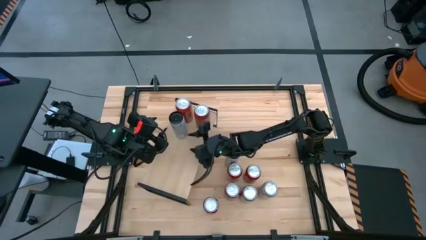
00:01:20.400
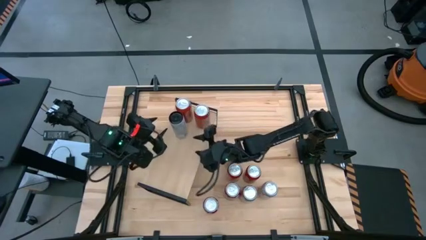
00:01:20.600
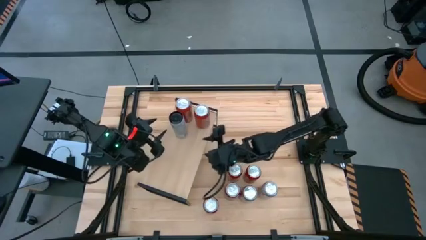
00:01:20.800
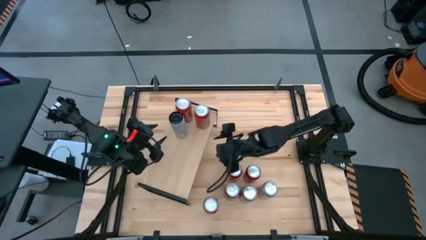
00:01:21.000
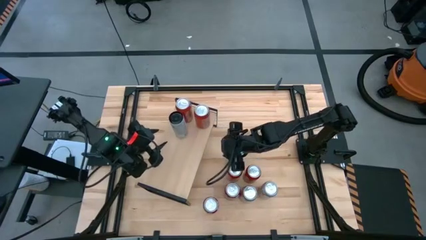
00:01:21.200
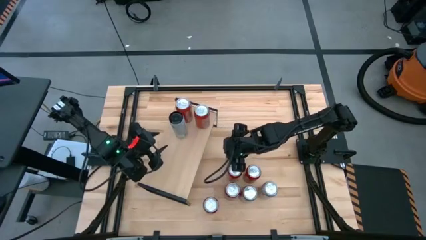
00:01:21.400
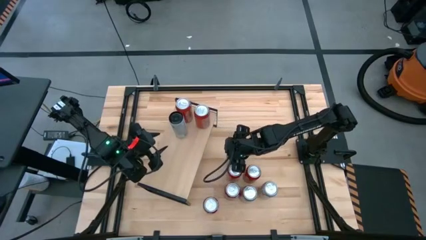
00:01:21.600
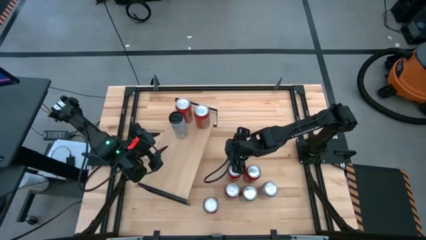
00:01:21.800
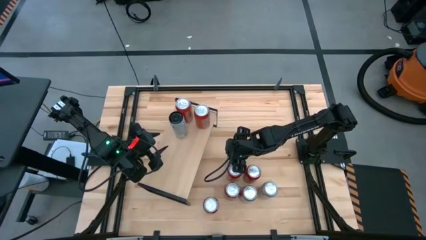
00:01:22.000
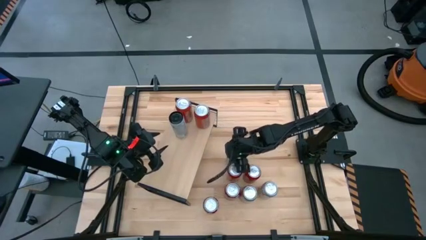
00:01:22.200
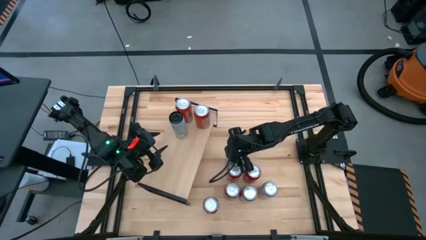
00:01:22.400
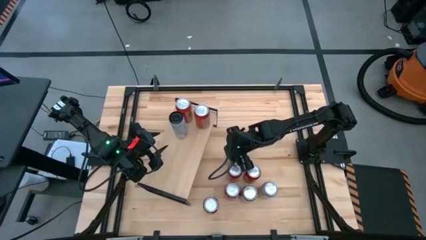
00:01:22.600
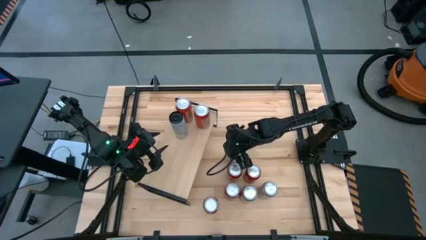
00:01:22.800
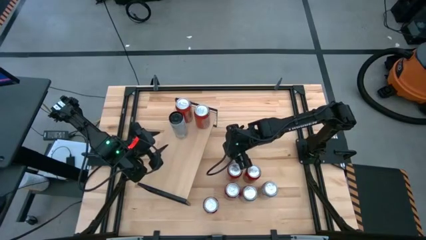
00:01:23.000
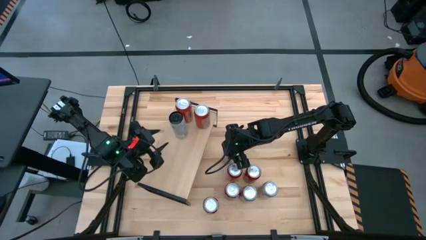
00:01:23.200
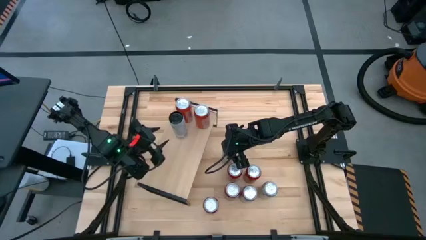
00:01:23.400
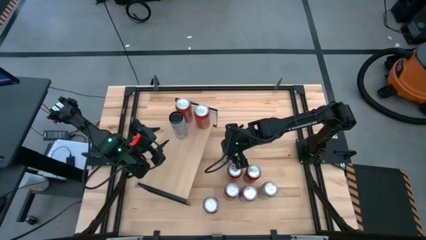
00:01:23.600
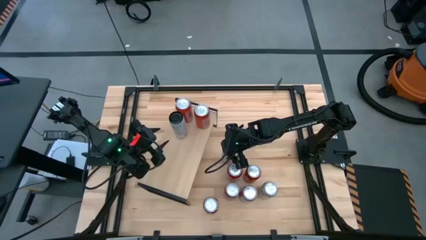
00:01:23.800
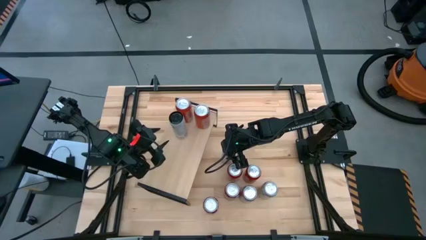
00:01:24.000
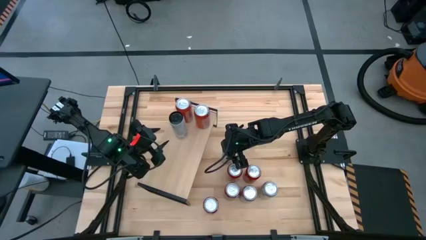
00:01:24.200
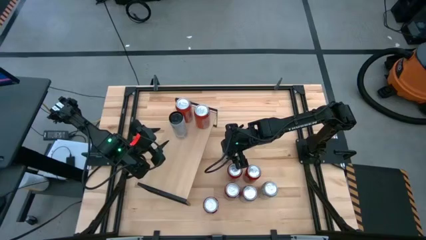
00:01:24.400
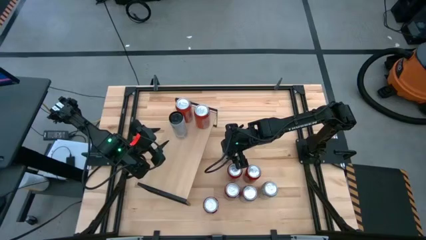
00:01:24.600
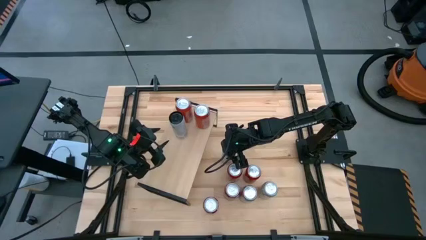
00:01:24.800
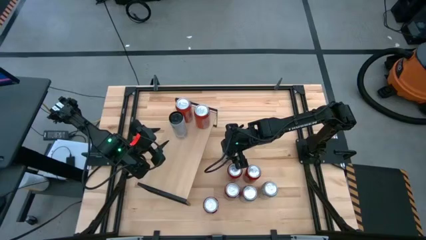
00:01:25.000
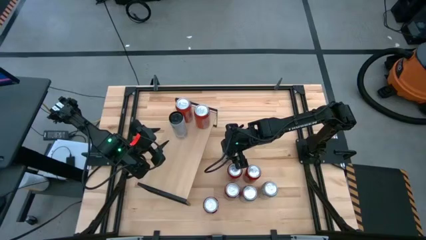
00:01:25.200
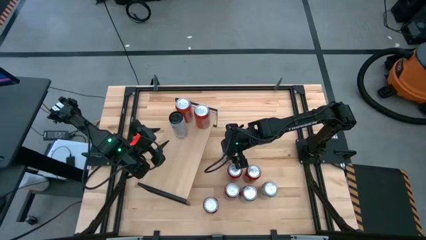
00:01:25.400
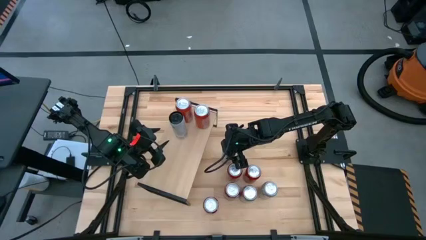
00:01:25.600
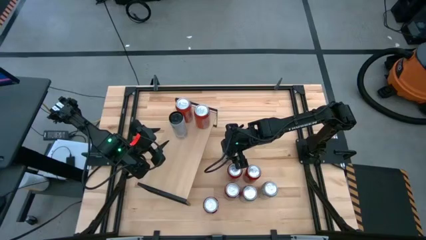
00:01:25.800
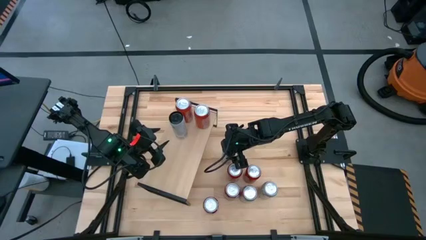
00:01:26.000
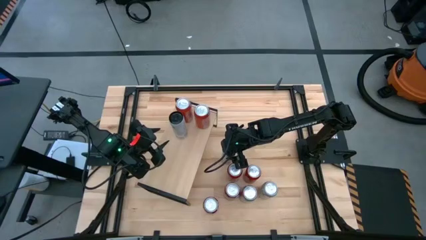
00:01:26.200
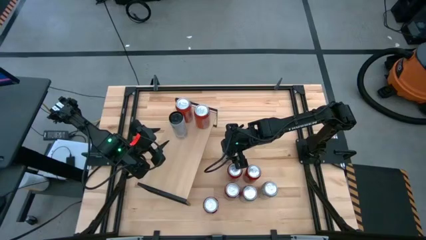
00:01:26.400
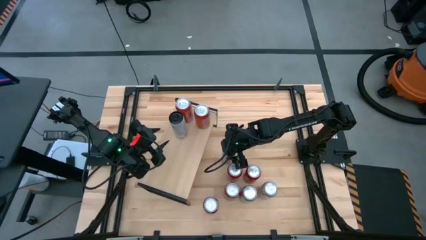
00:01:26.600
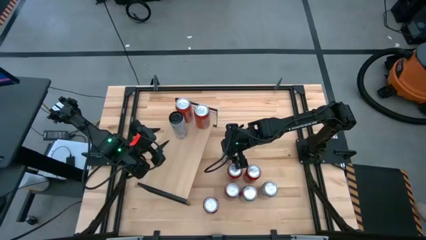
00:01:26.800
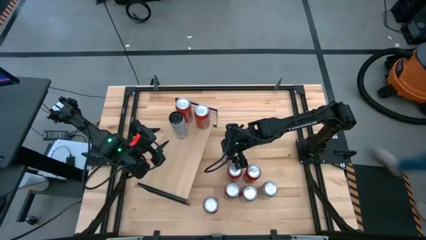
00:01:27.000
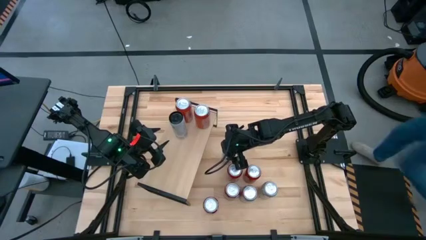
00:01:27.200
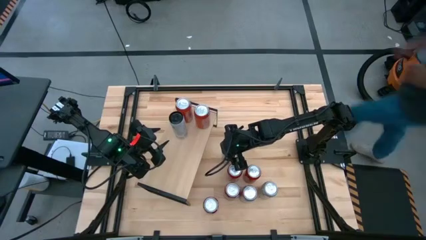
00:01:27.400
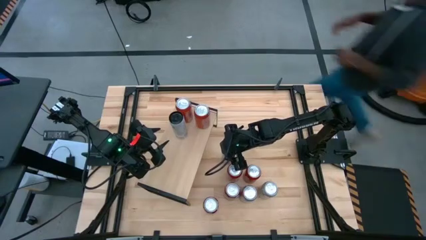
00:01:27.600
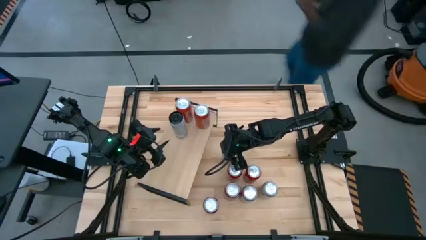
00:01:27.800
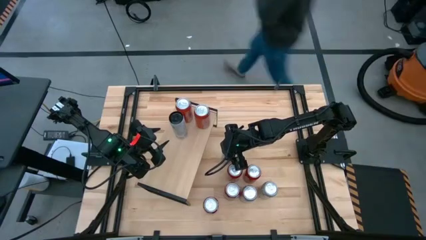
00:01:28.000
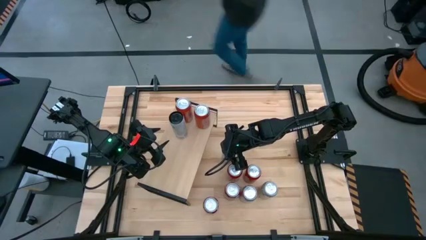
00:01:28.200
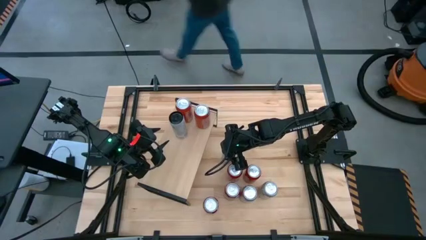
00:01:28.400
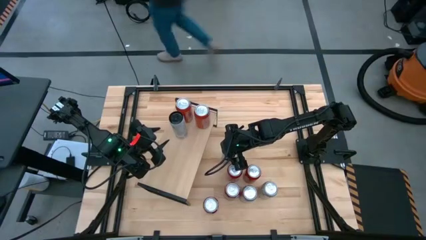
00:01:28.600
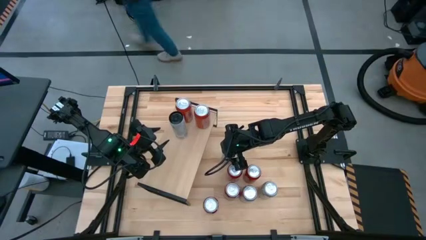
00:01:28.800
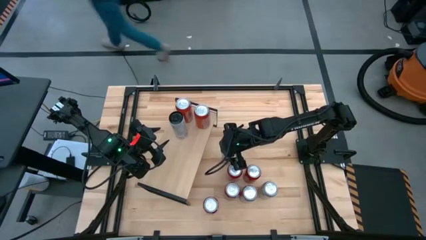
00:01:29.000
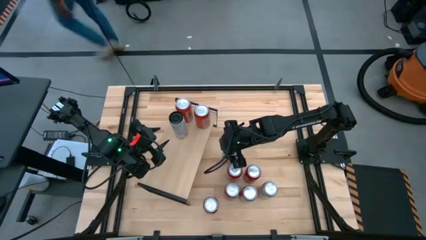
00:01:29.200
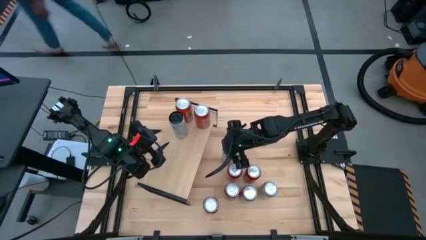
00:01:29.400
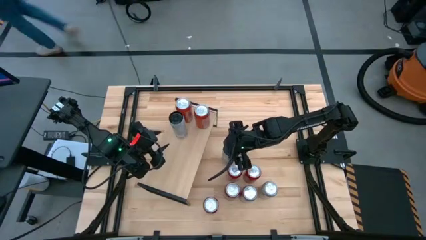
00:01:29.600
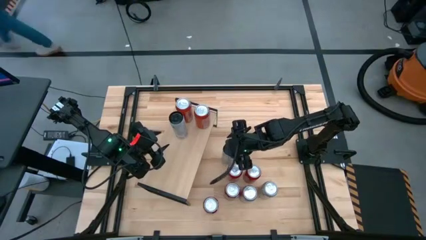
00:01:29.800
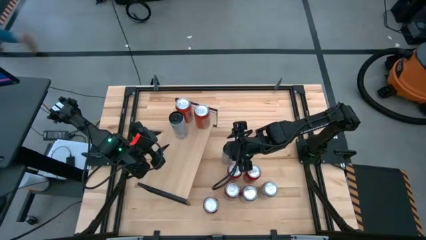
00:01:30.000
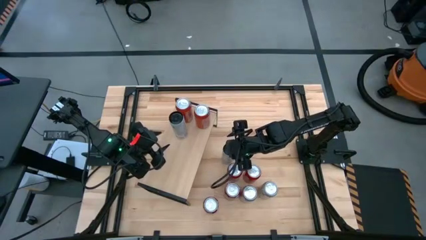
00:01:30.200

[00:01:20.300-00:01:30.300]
Task: Place canned beverage on shelf
Put the white soda can on the shelf

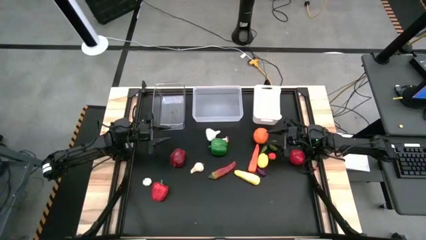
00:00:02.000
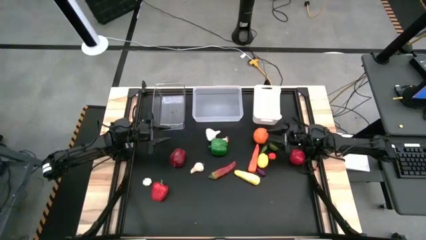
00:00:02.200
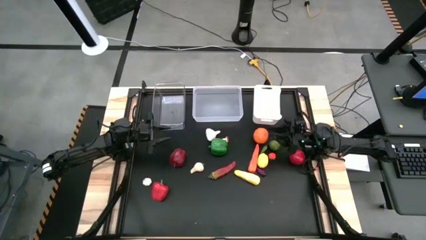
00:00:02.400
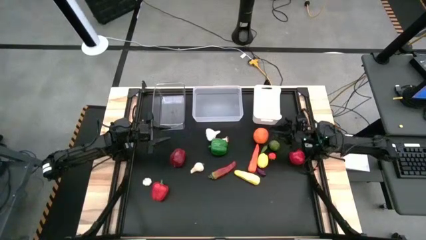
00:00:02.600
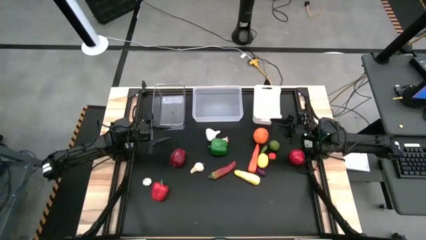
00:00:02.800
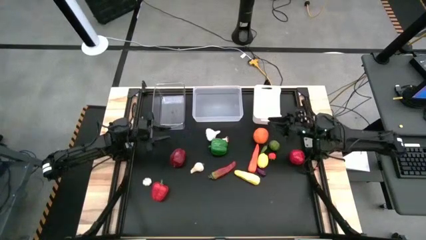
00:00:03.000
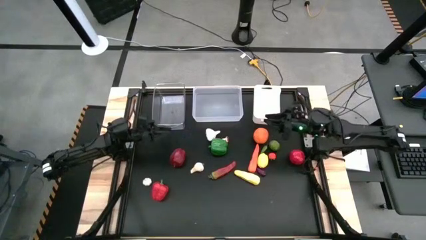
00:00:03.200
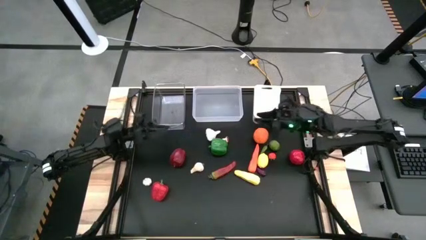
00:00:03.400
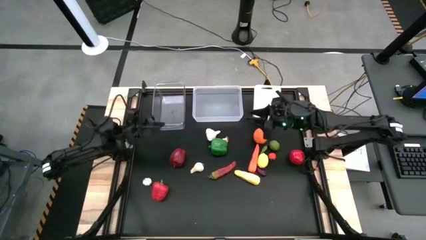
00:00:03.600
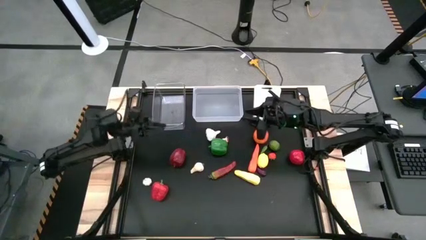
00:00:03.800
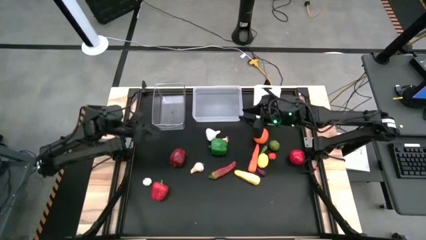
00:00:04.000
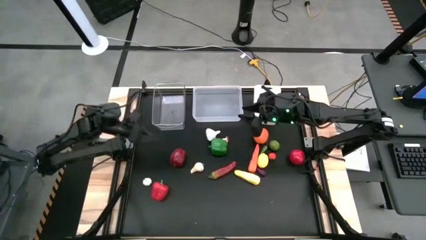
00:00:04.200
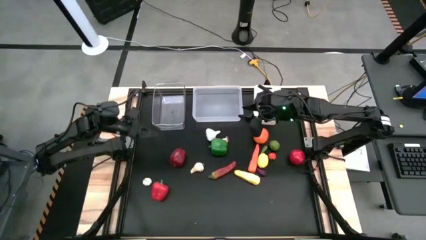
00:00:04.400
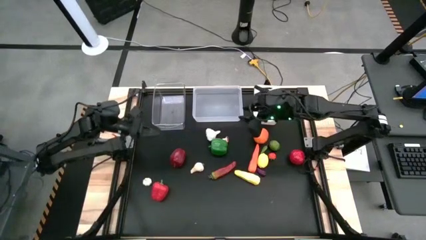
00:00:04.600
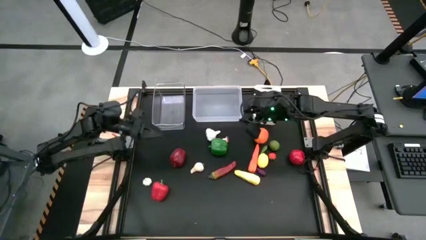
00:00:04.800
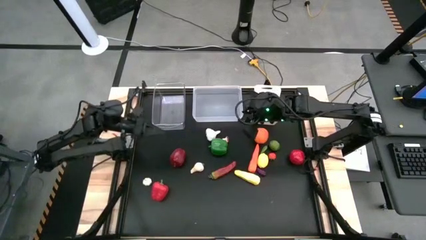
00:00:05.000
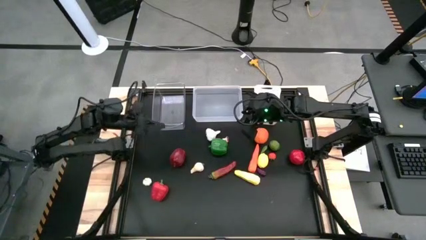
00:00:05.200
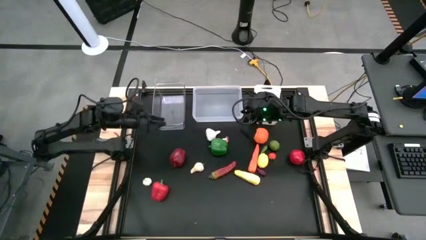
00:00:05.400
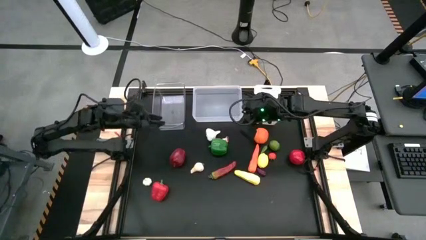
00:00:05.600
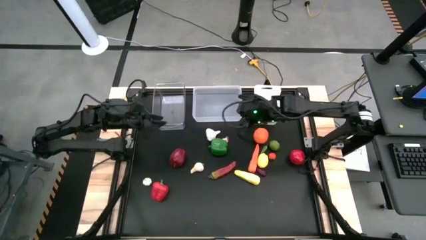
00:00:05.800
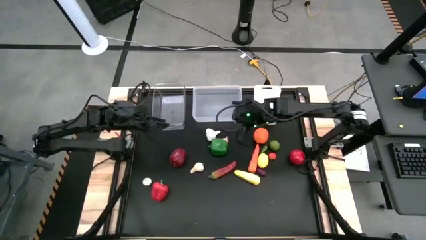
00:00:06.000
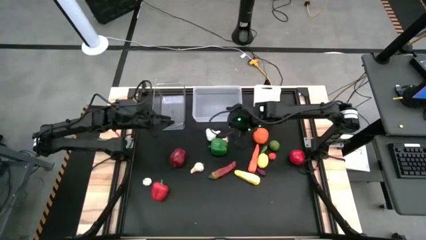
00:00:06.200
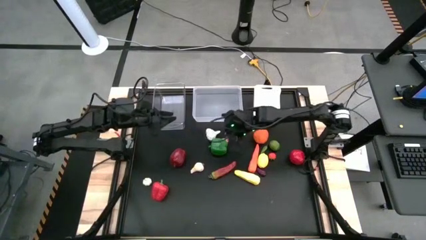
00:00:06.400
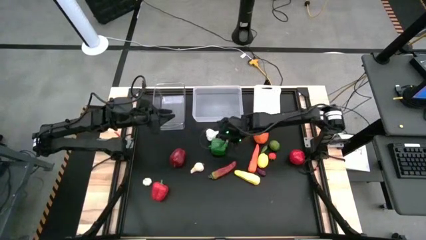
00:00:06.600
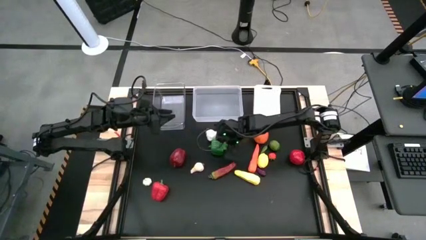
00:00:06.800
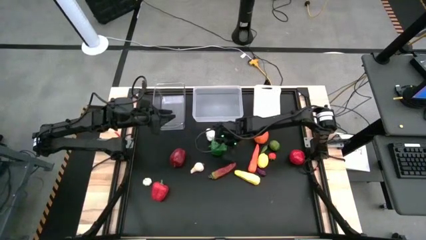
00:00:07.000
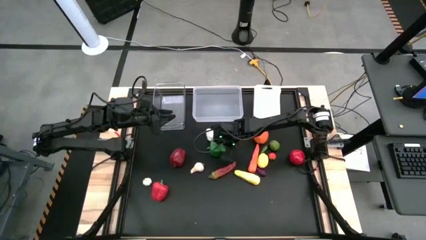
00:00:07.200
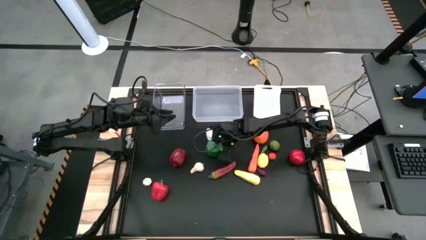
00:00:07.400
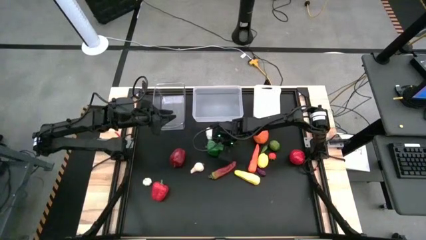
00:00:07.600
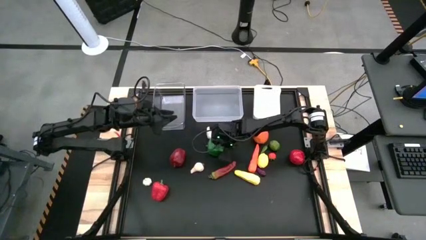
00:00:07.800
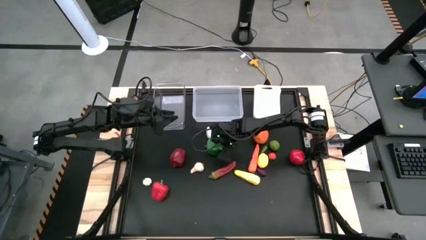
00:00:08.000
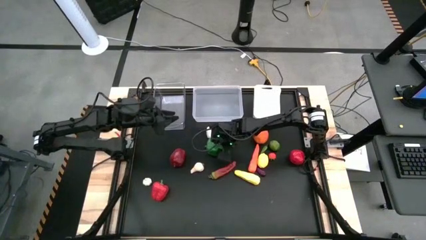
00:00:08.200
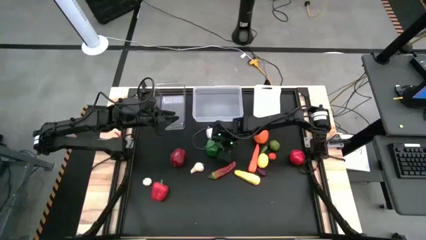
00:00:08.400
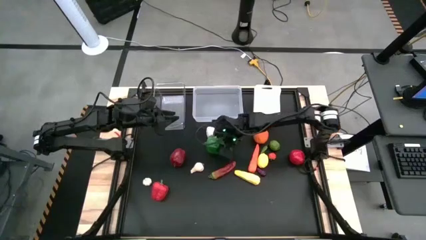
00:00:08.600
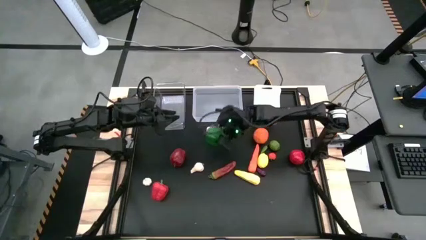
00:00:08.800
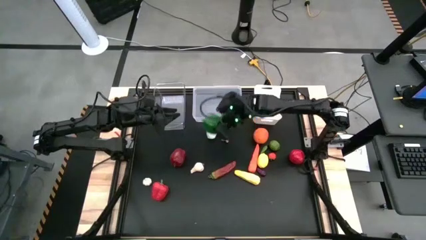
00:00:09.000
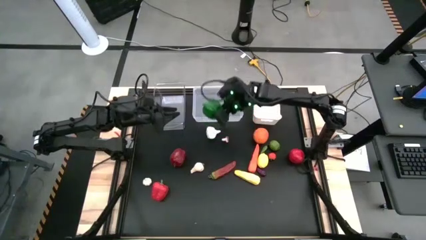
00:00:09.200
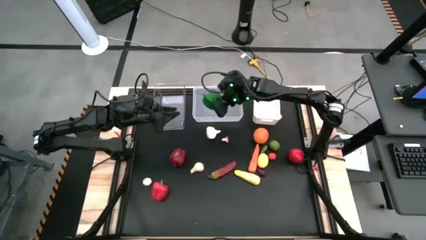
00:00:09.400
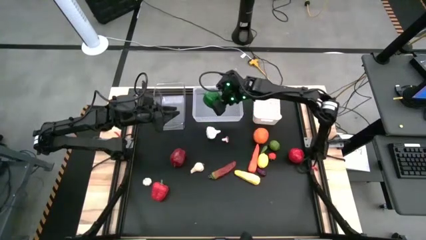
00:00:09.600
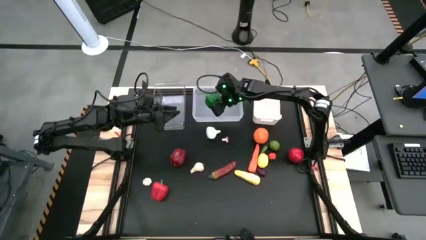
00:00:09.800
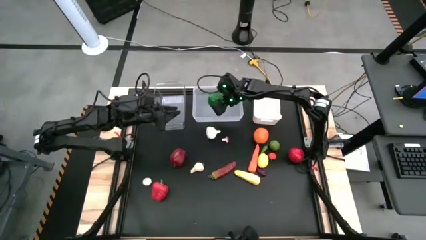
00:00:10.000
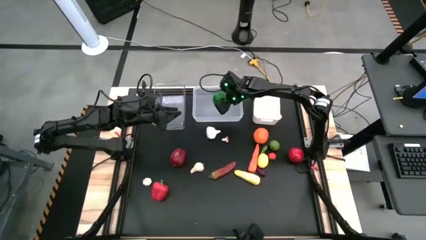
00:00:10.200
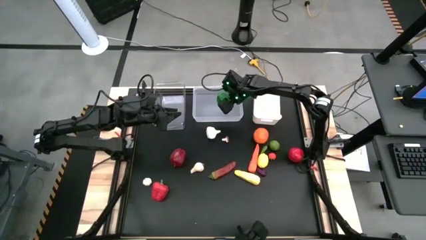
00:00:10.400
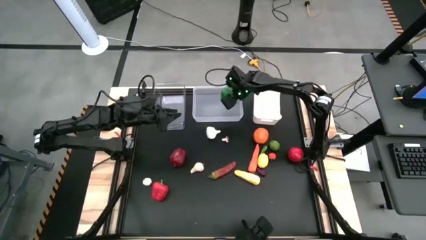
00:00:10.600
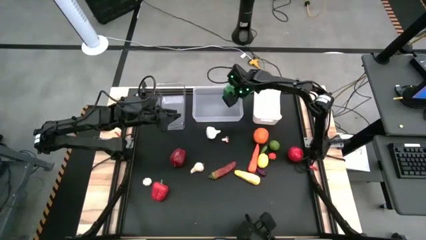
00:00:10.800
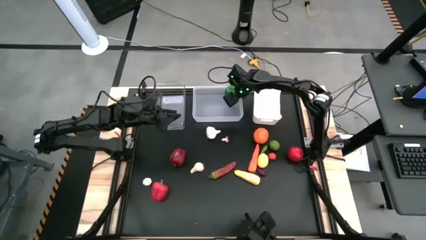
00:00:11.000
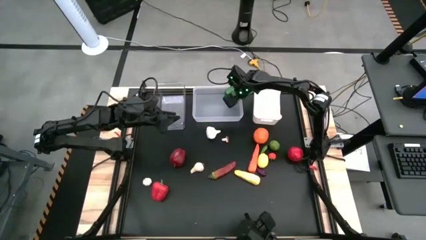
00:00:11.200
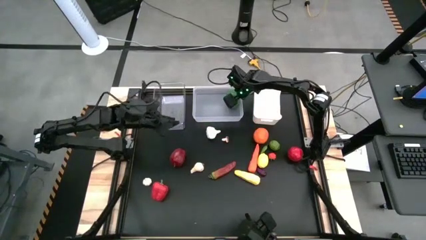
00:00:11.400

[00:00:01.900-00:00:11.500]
Task: Sort produce into baskets
Put the green bell pepper into the transparent bin
